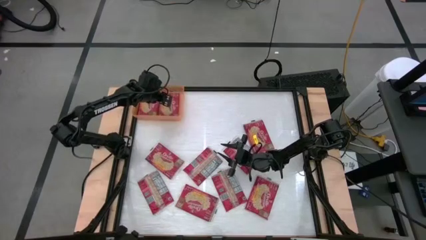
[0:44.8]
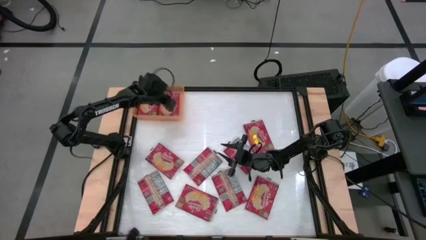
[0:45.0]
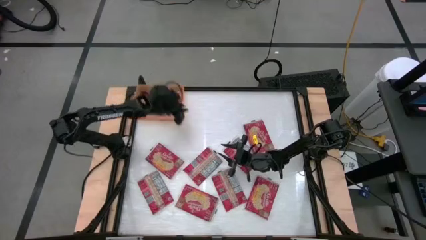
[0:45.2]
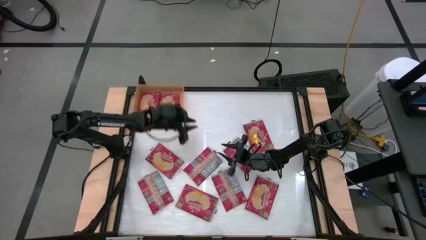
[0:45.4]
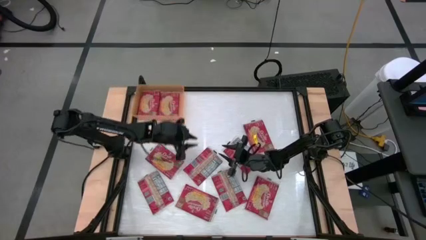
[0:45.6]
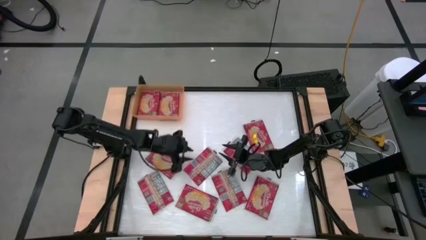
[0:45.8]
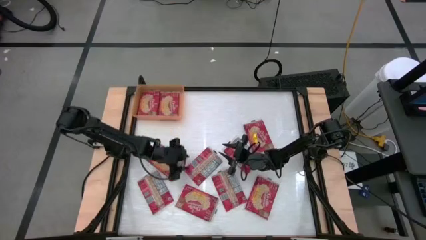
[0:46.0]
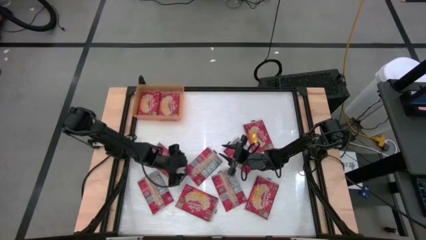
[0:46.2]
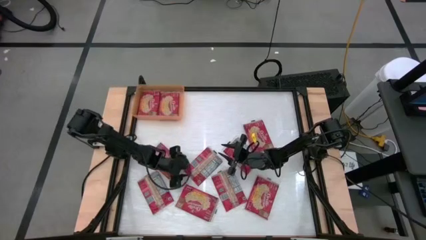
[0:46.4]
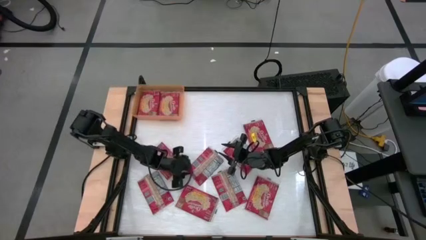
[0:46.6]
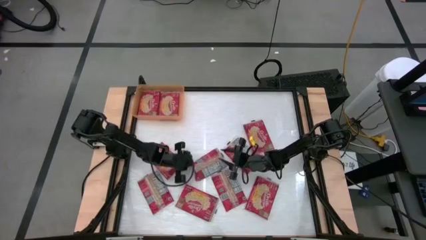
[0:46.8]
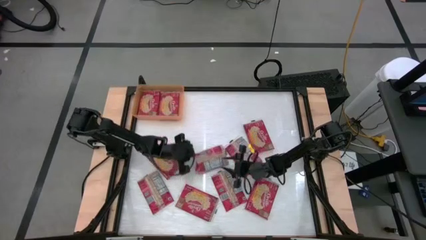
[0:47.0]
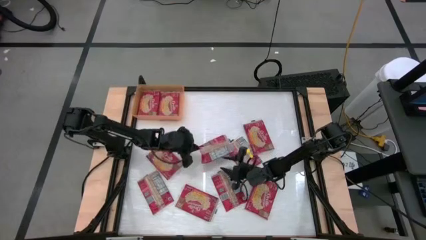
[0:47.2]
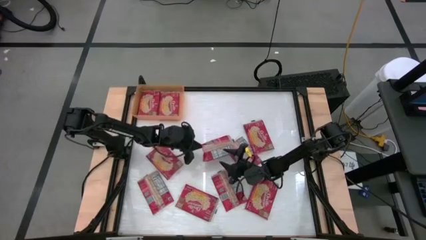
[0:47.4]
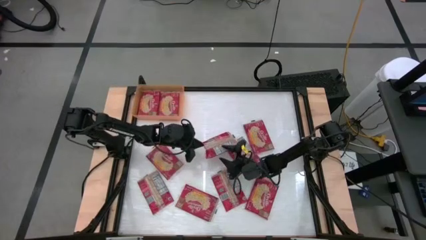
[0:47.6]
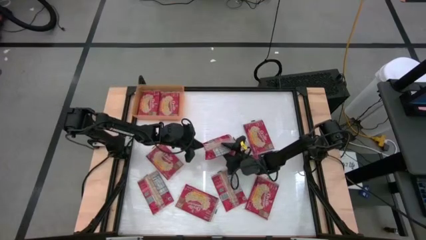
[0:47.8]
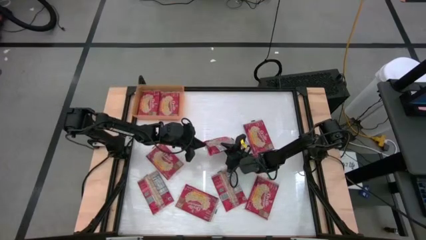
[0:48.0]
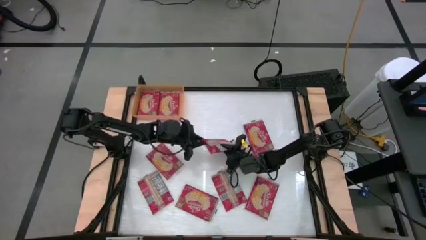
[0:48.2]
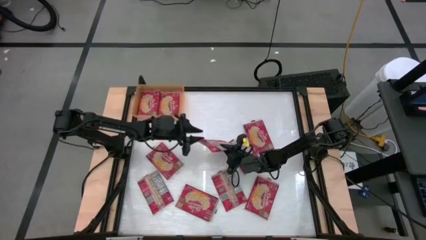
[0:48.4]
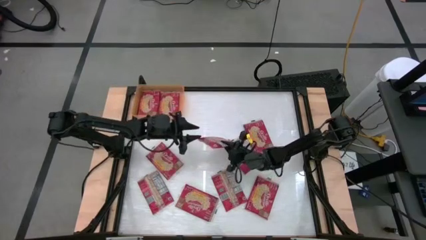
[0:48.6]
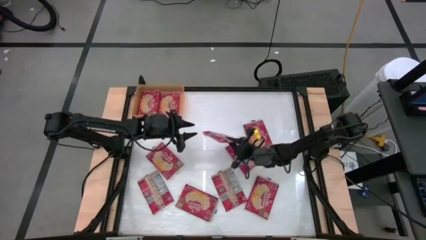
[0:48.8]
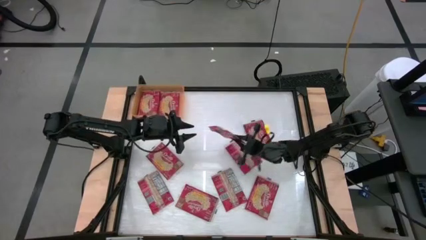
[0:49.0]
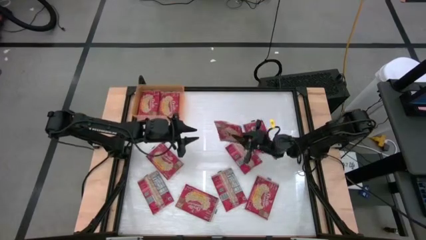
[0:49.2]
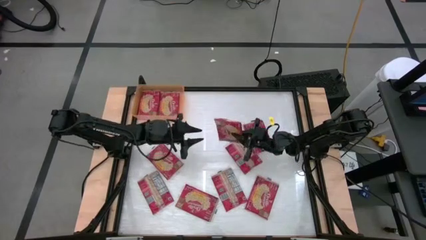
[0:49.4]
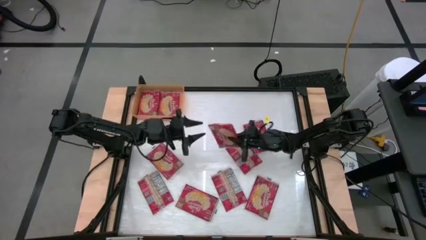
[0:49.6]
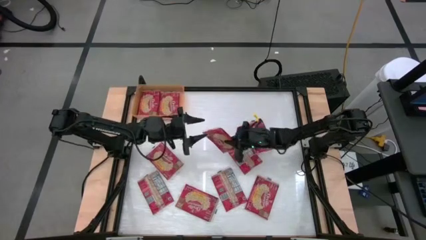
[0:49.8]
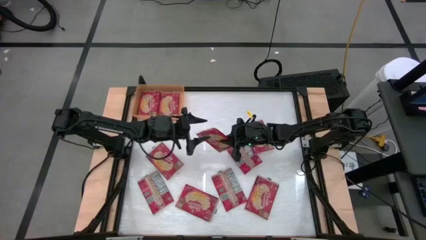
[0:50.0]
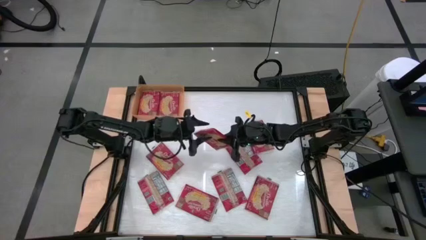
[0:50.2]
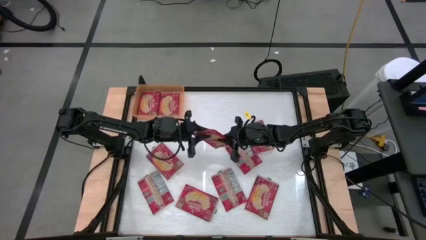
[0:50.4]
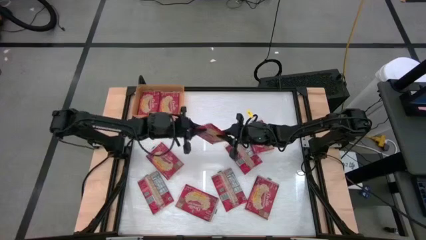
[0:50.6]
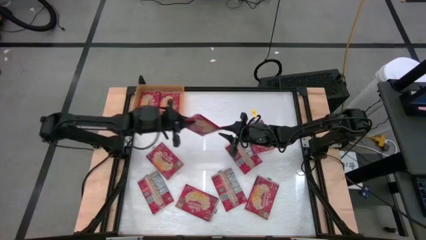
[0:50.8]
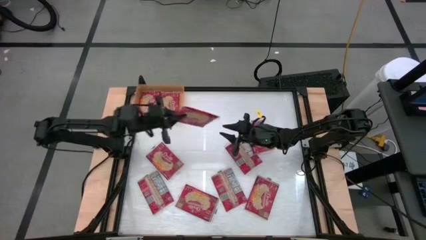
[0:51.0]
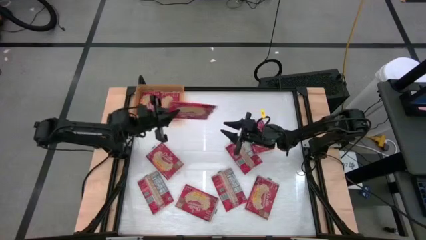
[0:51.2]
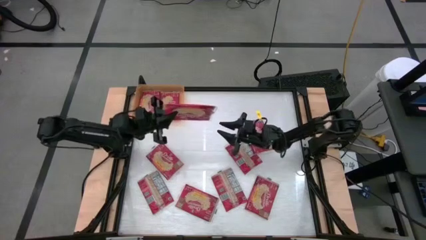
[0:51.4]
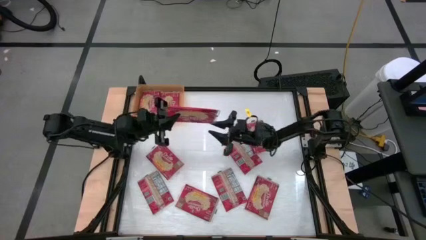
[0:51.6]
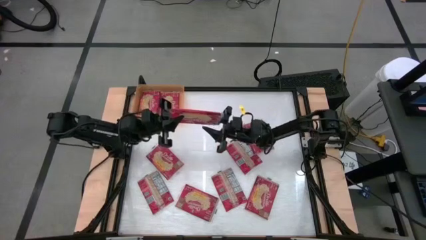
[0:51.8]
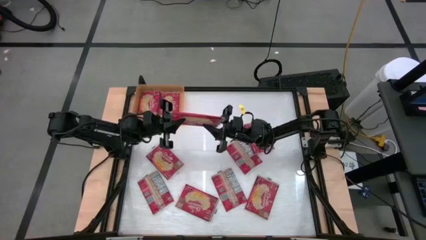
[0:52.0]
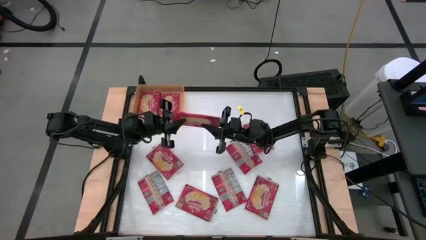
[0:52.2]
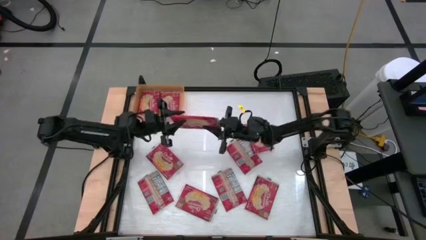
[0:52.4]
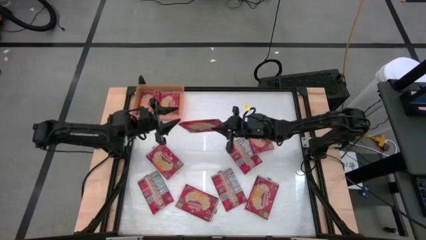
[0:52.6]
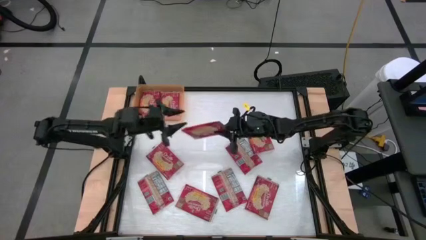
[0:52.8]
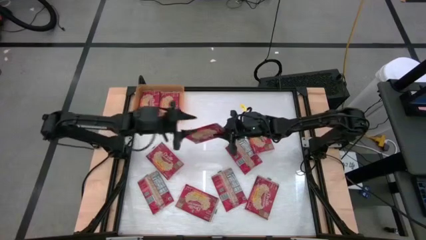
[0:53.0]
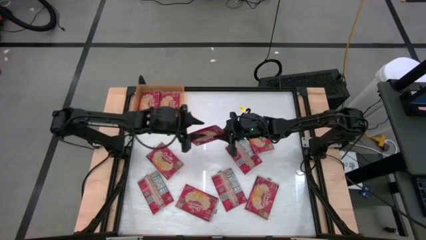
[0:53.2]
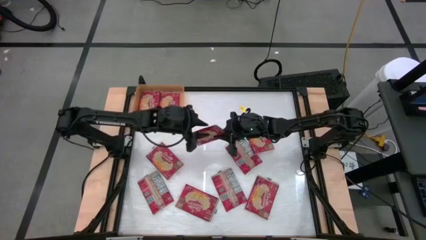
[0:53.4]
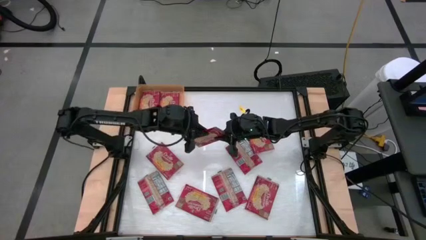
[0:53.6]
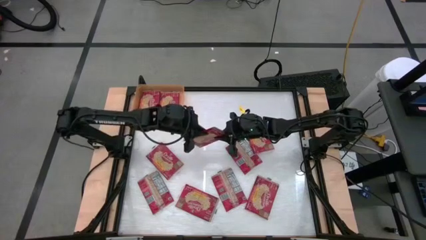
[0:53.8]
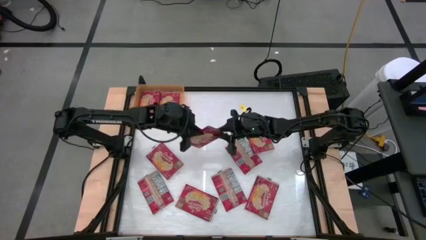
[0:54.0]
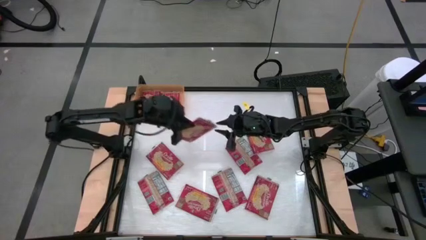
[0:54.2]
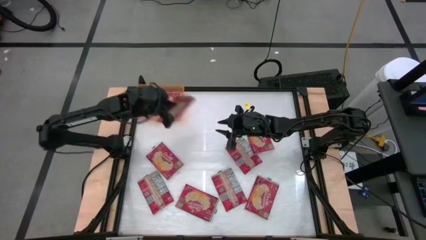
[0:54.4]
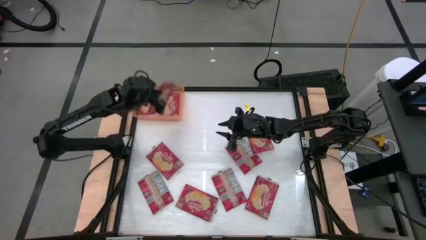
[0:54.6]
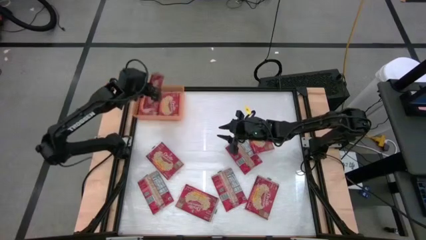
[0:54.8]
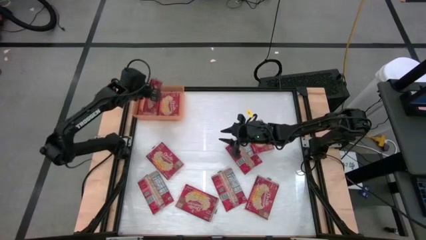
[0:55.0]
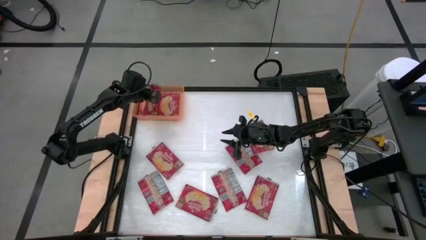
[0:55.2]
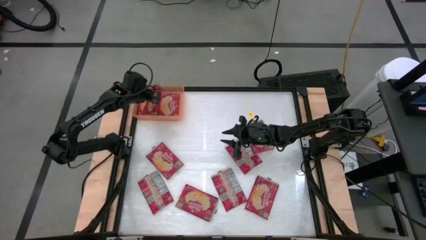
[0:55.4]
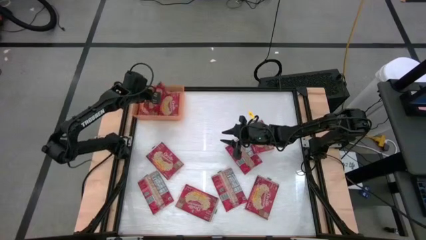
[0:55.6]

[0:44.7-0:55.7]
Task: Sort popcorn bags into baskets
Put the red popcorn bag into the orange bin

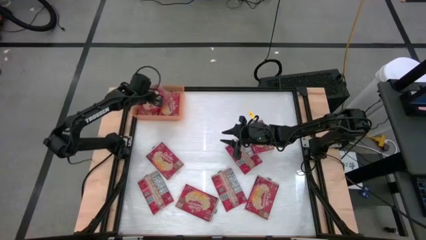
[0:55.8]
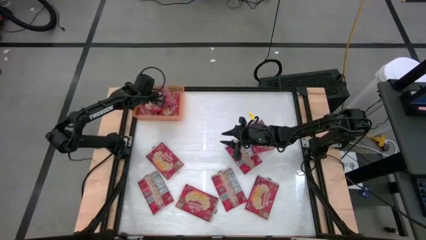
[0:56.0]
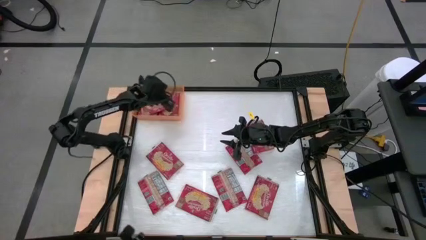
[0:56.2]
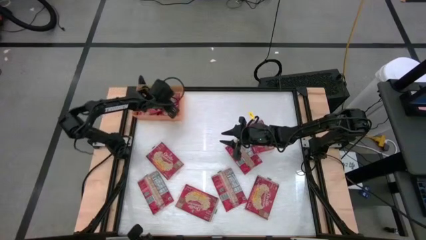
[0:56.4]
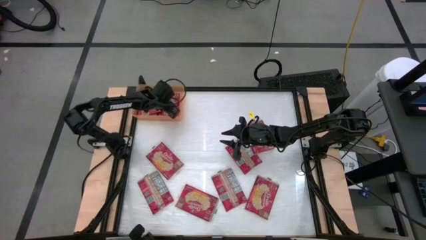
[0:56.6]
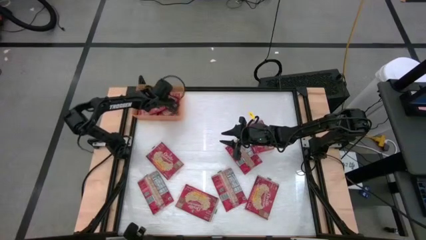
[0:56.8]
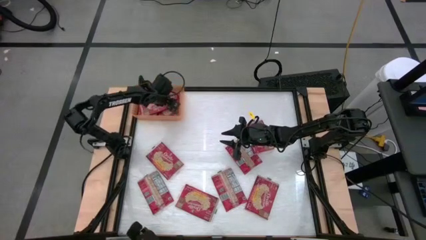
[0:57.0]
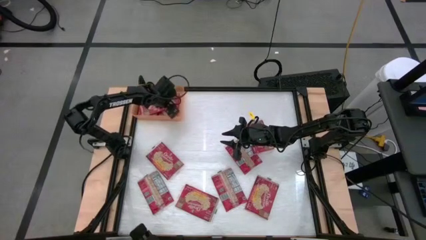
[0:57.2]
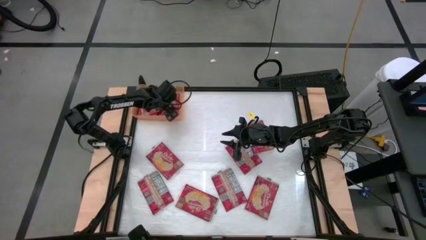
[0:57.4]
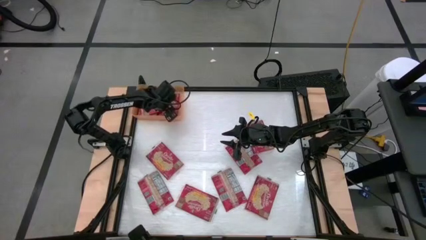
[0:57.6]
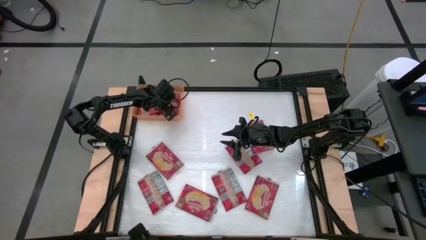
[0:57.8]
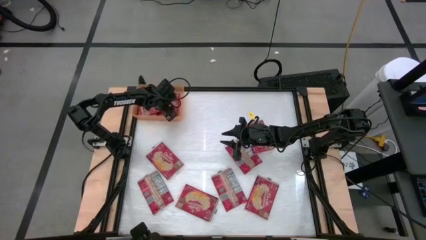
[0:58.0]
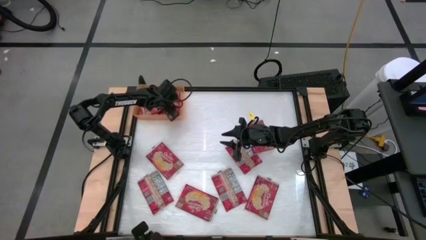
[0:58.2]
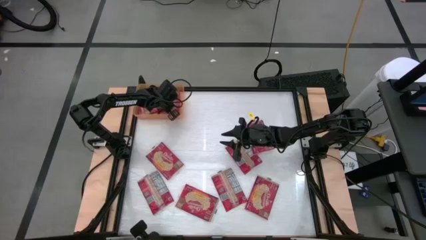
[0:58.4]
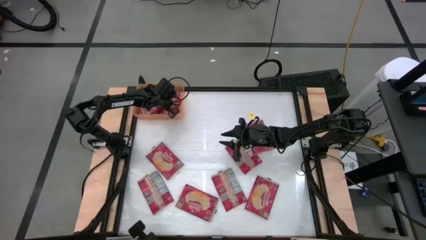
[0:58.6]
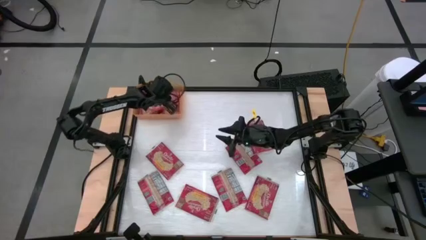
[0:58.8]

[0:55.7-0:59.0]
Adjust the red popcorn bag in the orange bin
